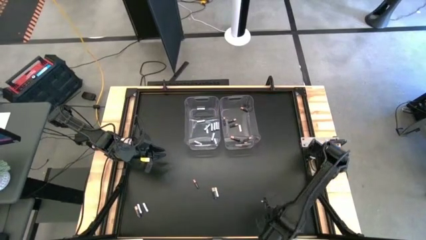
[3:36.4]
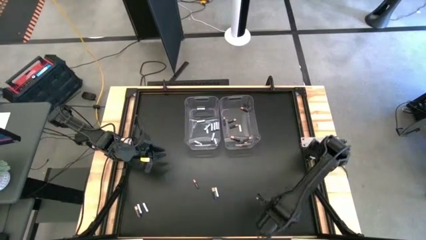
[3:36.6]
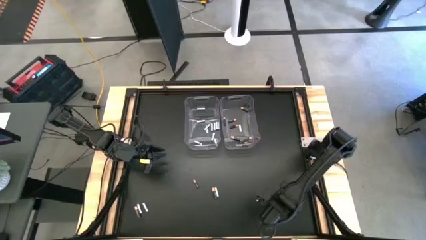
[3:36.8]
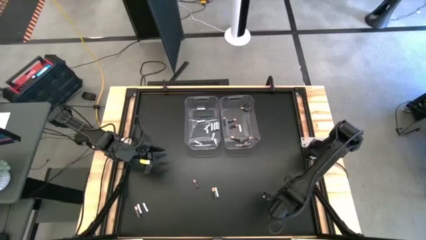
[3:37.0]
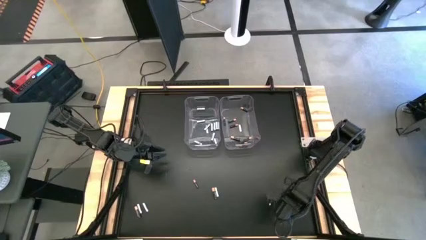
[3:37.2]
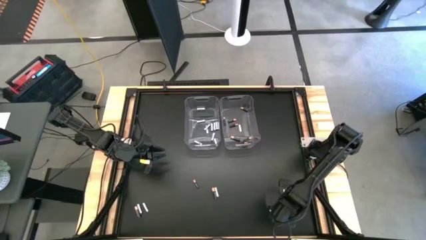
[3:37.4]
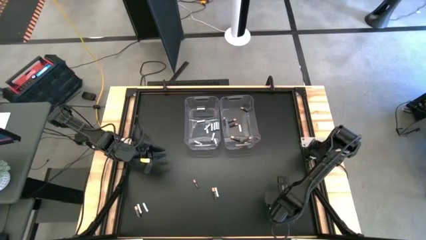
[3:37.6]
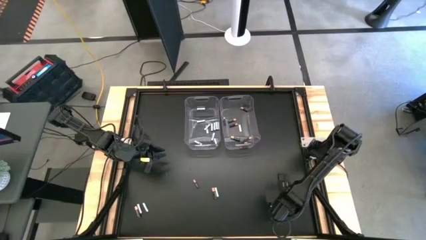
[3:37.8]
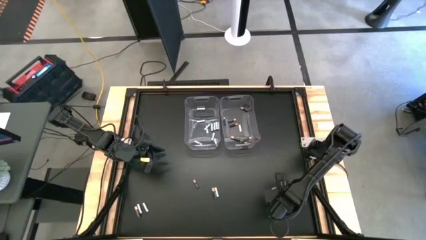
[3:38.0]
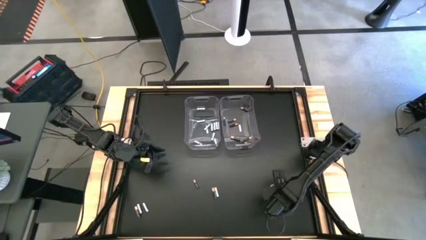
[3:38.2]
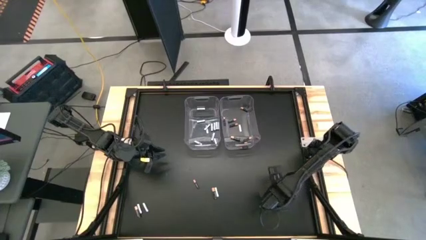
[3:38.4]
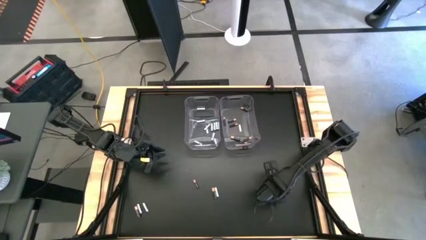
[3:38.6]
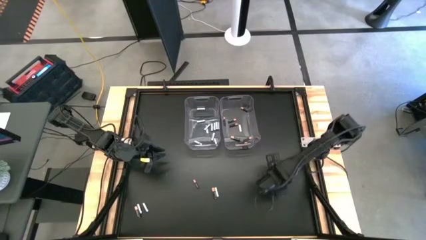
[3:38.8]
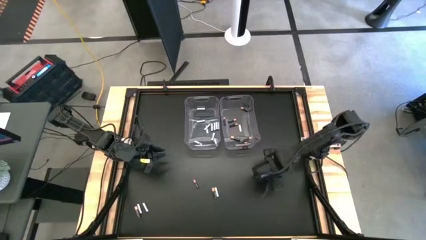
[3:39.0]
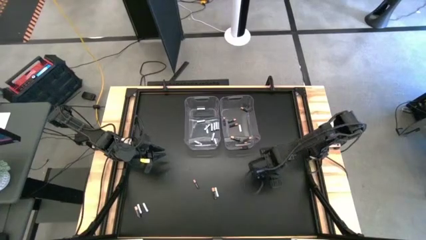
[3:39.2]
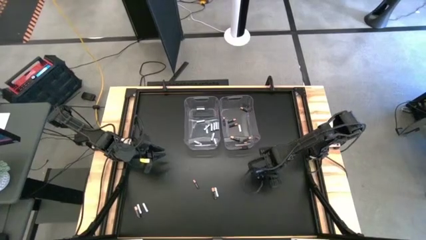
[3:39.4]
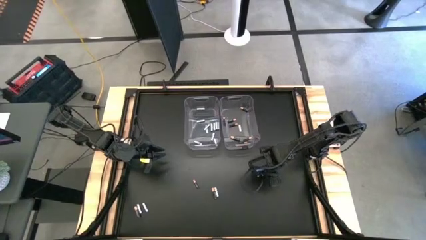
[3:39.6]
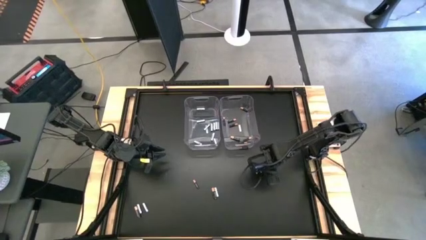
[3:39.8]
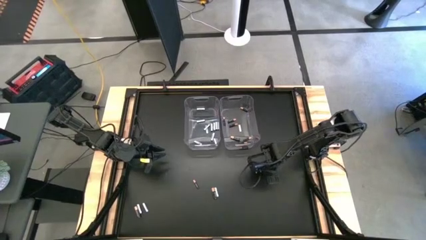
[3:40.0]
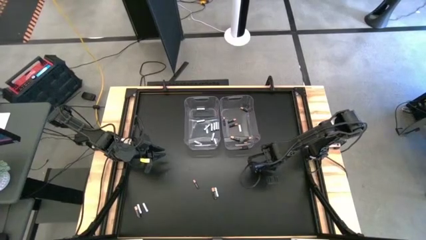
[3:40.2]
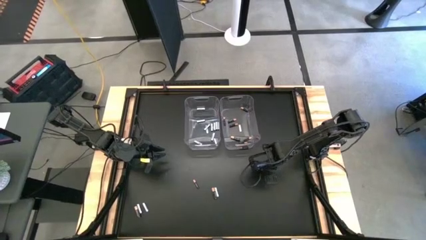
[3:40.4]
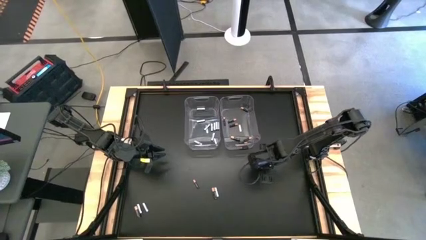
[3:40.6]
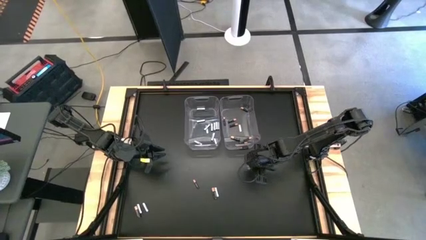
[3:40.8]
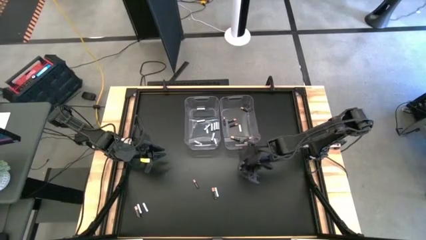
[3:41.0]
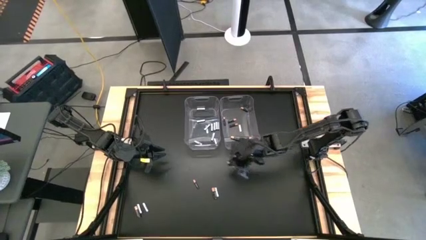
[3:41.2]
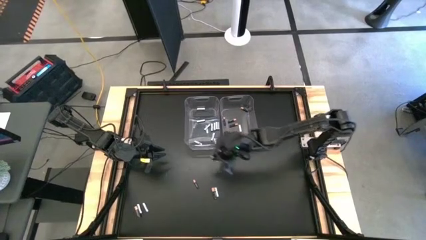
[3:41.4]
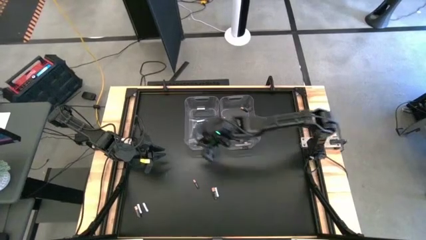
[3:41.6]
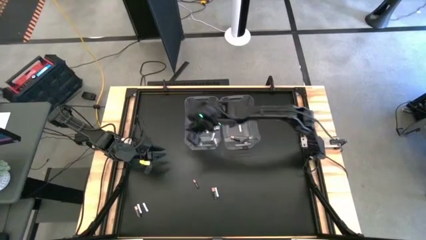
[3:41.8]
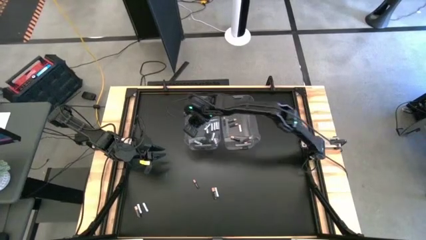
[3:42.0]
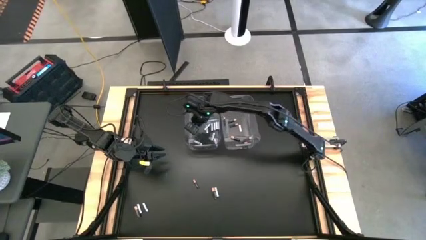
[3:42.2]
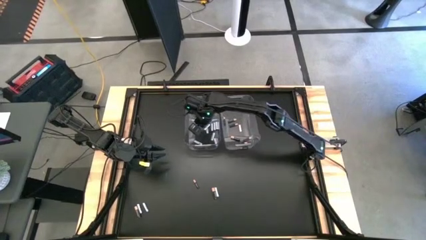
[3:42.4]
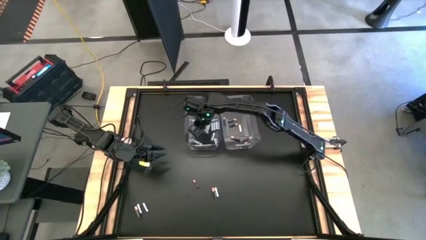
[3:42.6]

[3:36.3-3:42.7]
Task: Sort batteries
Put the white battery into the left transparent bin

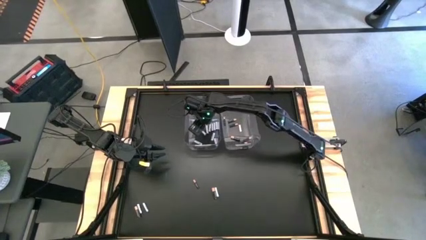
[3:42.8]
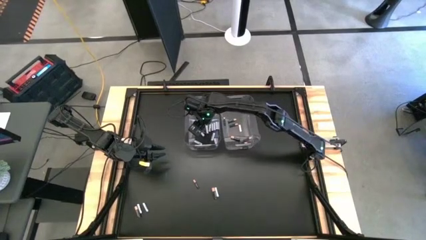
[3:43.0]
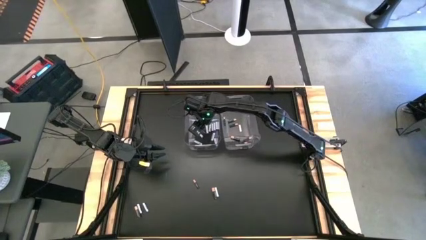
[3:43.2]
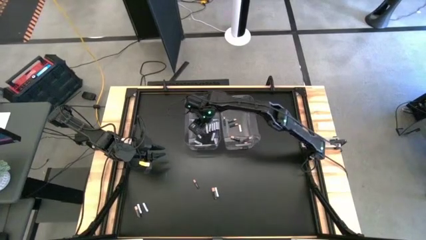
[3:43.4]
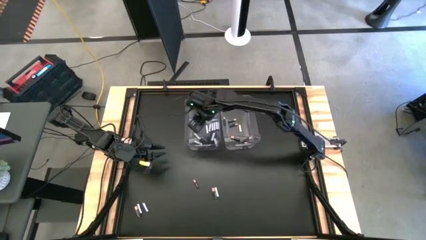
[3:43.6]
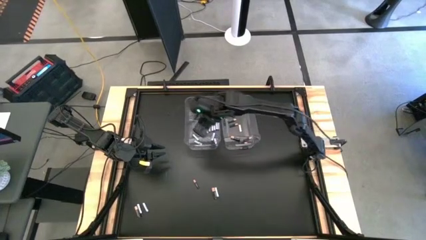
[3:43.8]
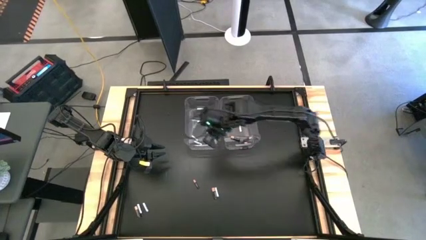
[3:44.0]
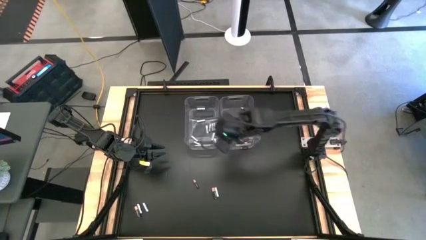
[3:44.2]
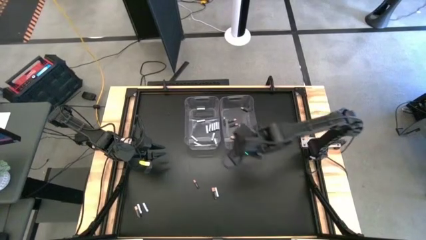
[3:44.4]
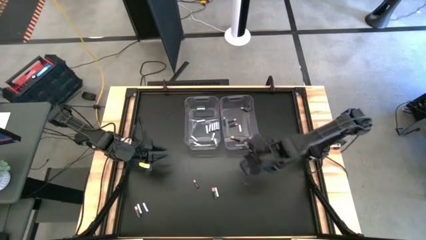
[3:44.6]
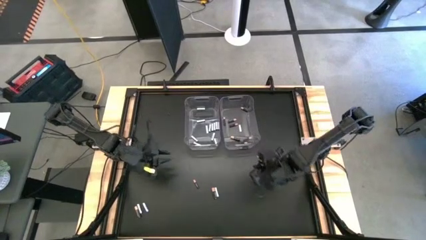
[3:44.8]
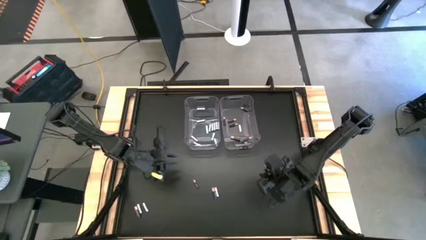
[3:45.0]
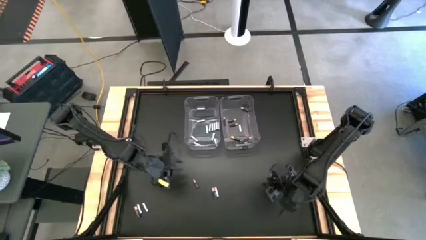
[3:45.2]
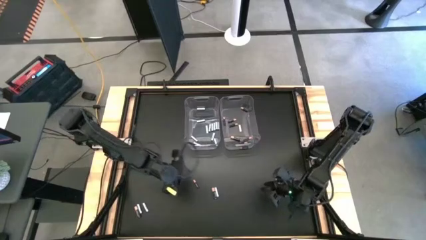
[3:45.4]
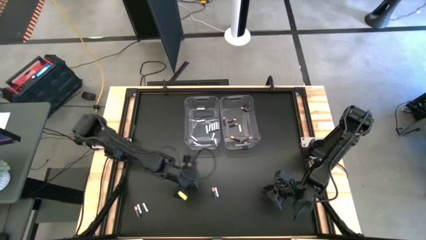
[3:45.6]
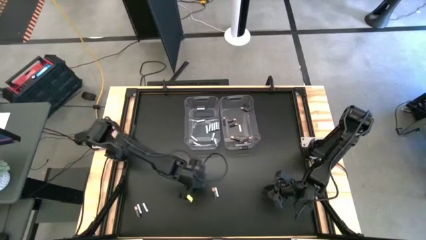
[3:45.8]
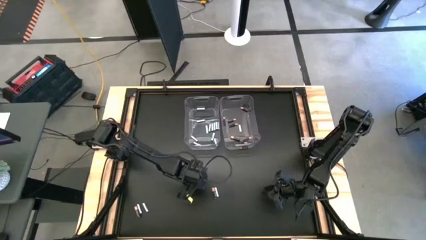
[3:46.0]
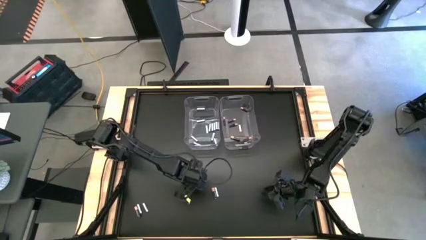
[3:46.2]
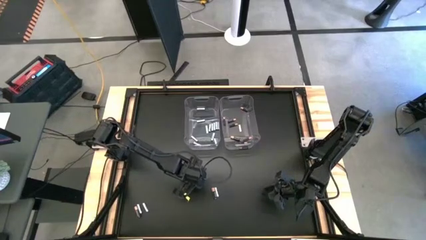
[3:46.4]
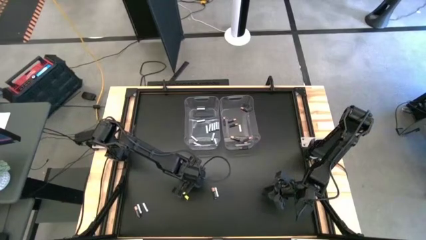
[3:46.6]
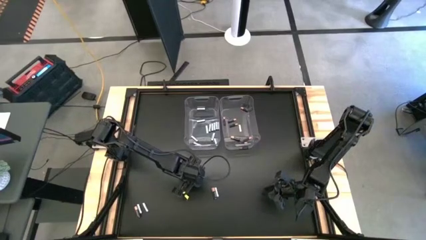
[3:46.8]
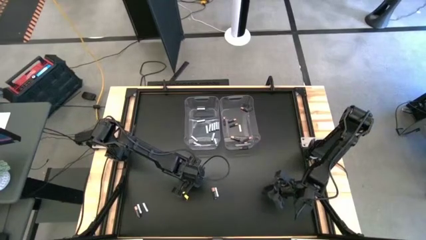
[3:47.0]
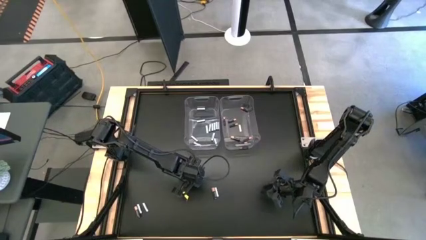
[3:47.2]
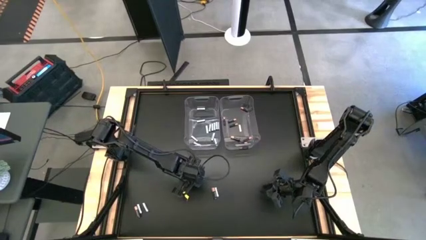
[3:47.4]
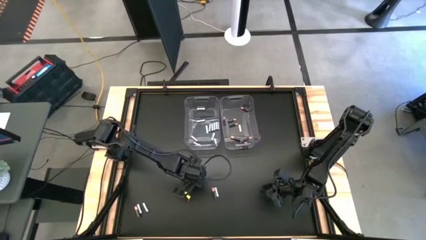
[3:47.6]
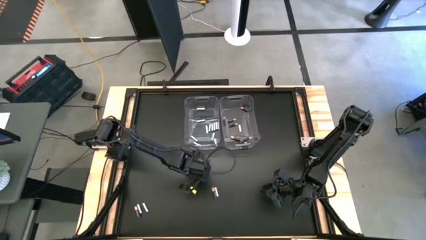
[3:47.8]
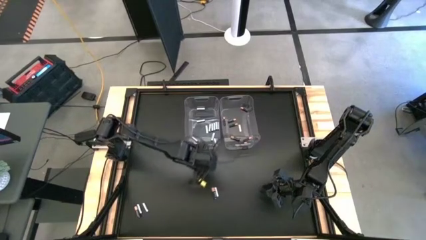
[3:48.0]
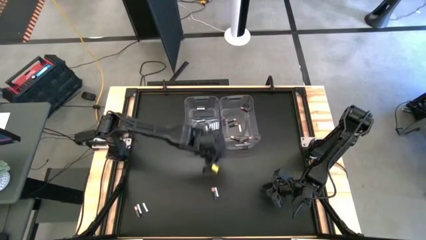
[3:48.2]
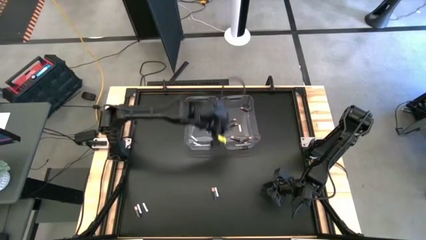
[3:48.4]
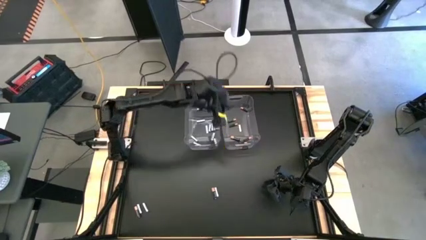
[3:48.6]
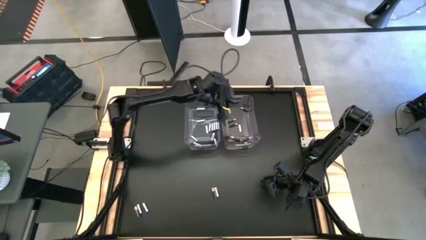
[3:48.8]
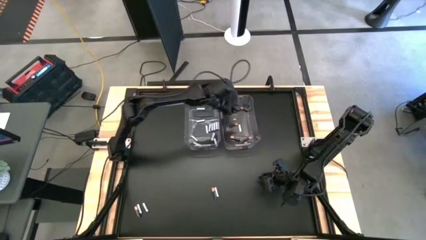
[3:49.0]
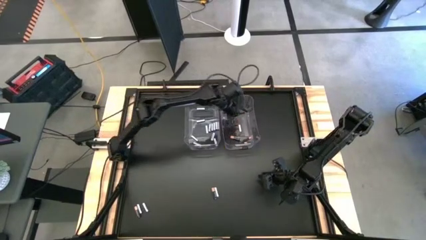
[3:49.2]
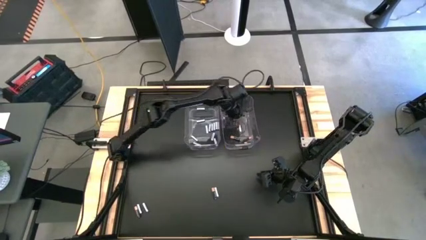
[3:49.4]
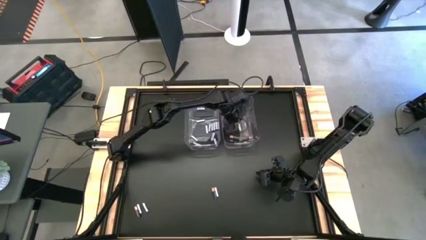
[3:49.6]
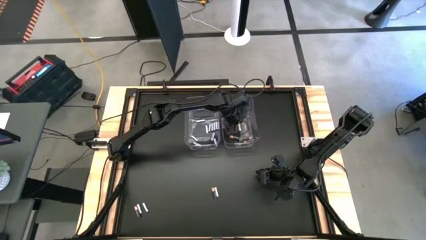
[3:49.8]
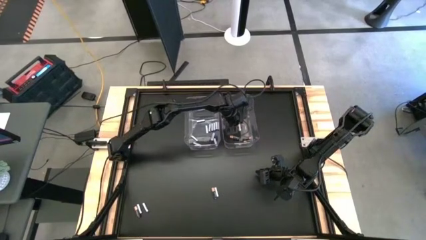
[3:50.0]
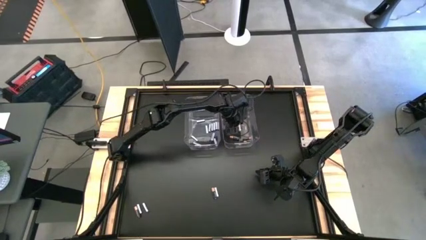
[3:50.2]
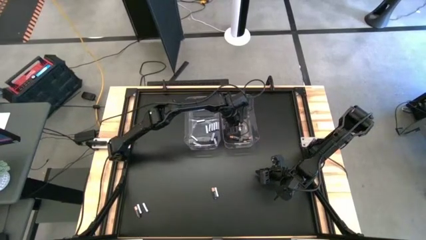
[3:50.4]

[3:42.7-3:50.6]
Put the black battery into the right transparent bin

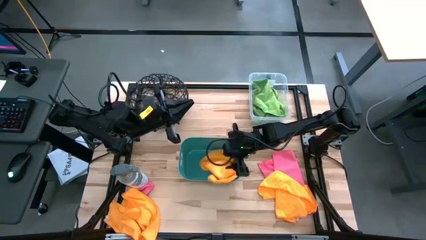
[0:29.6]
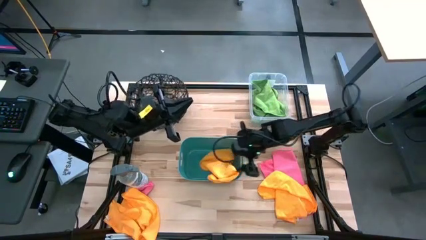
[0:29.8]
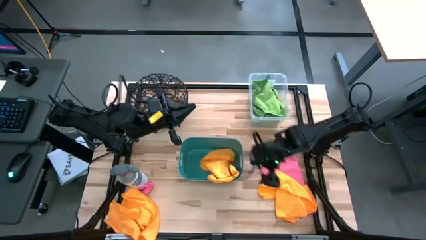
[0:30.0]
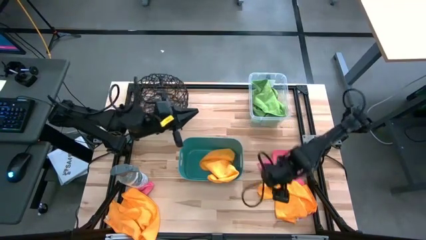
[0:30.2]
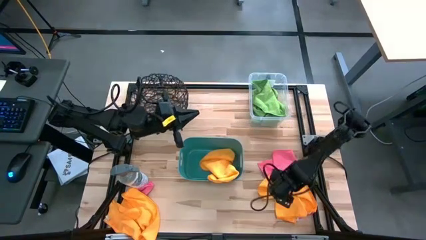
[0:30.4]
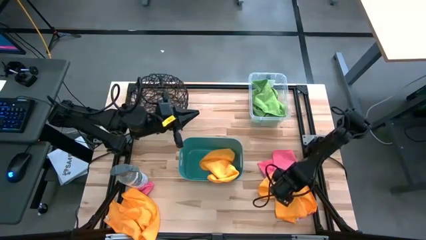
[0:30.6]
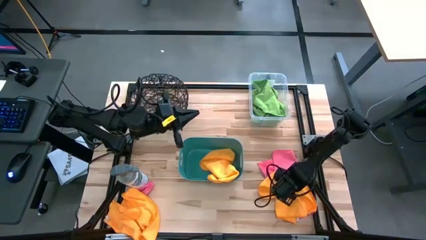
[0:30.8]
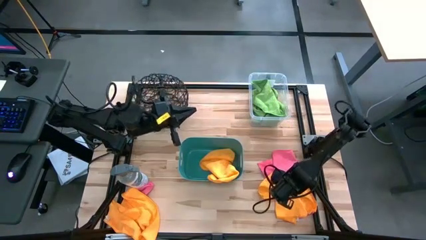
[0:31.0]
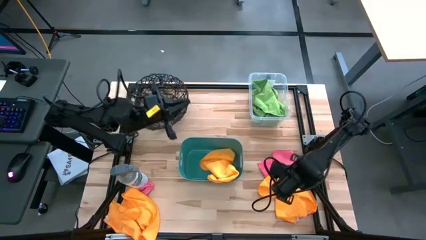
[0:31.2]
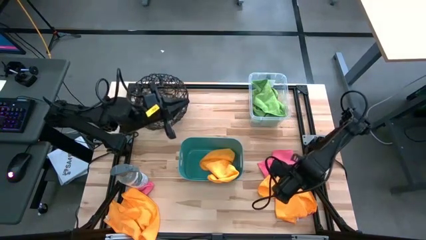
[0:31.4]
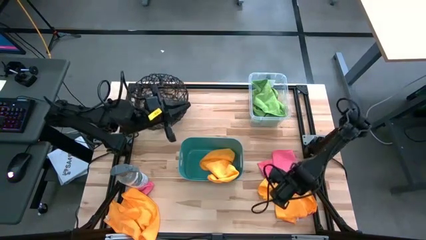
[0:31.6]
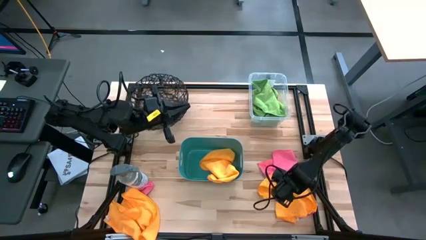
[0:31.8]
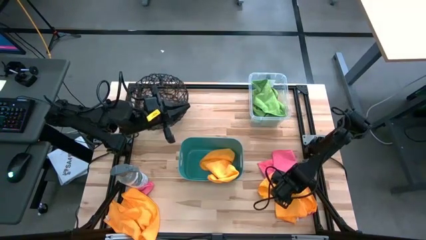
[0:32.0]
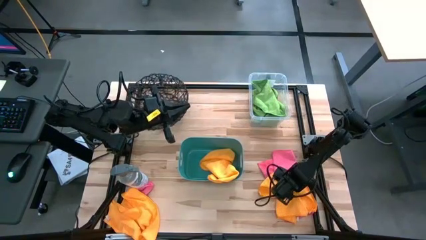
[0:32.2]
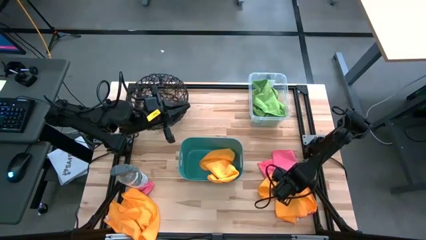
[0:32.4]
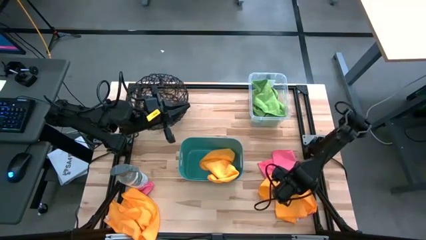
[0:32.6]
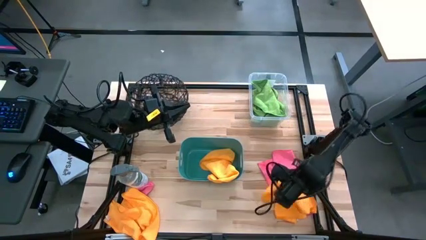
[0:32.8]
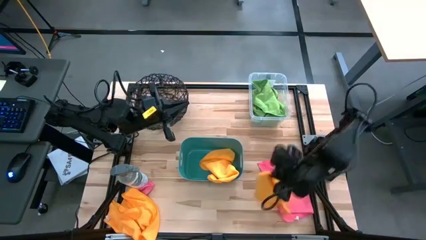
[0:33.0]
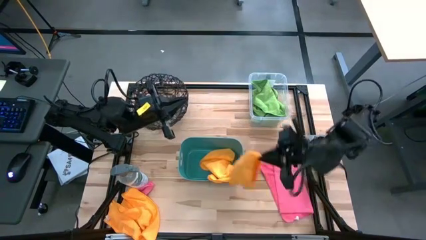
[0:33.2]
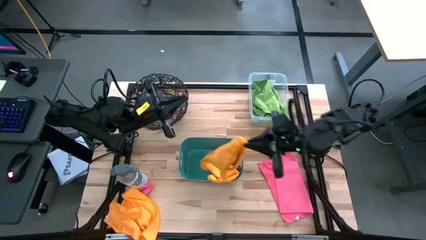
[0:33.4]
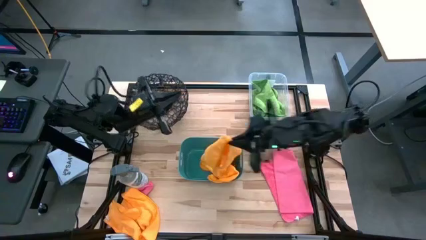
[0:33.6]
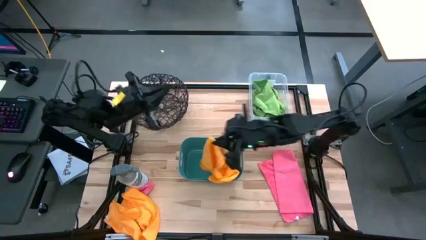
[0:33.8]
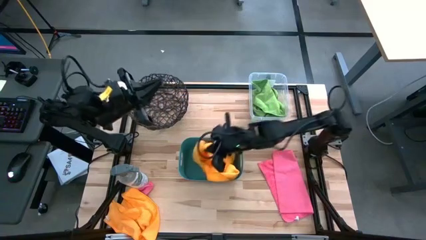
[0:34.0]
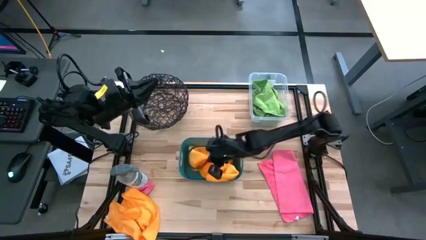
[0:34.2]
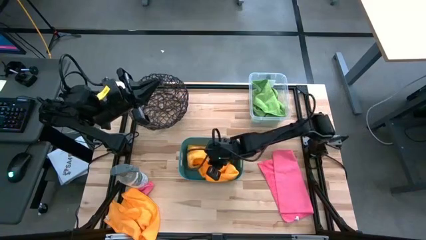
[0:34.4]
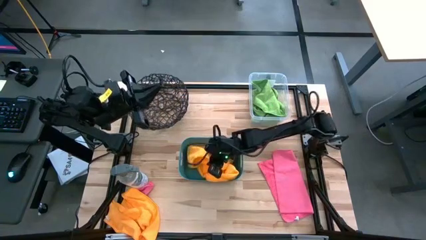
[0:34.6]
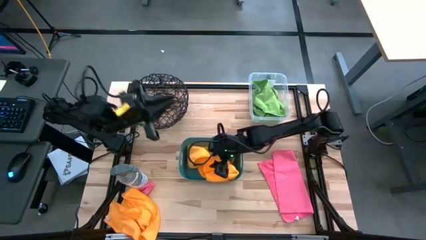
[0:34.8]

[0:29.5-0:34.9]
Task: Sort microfiber towel by color & place in baskets
Put the right yellow microfiber cloth into the blue bin
